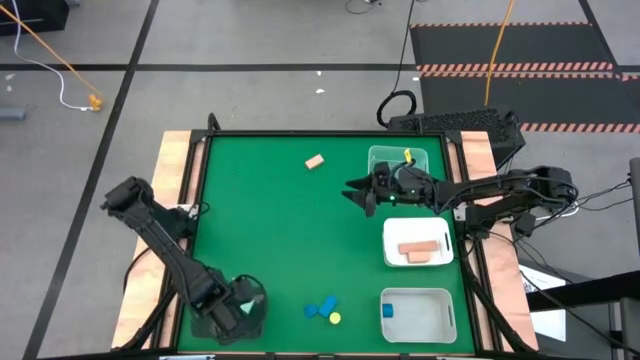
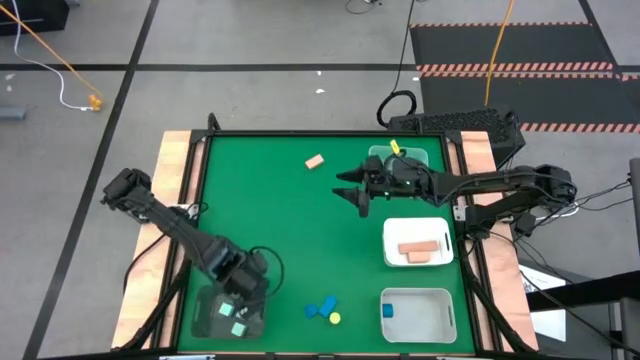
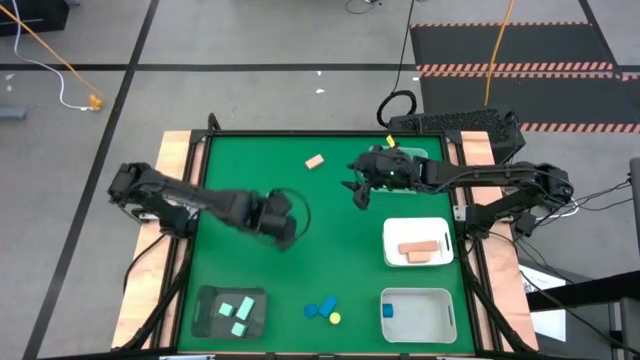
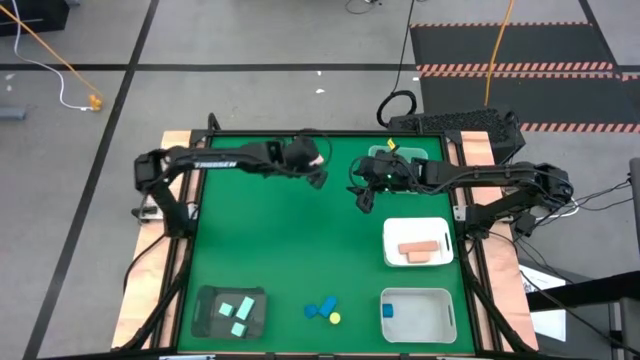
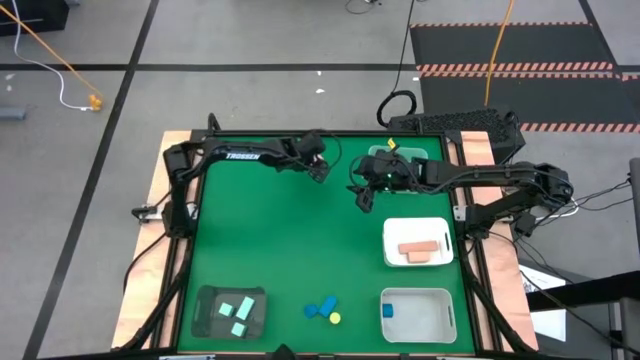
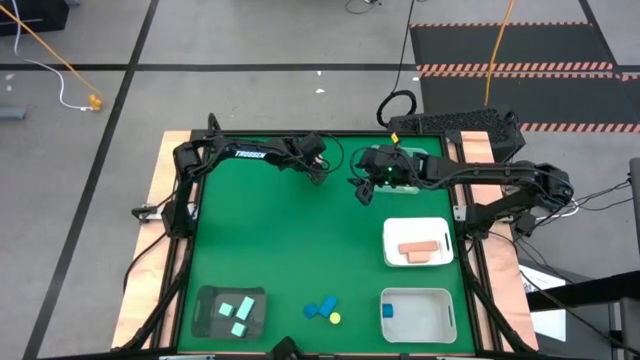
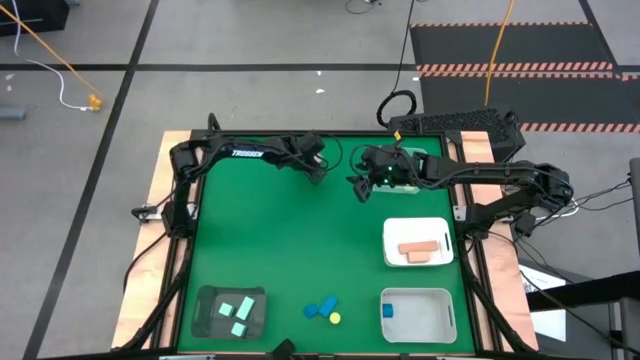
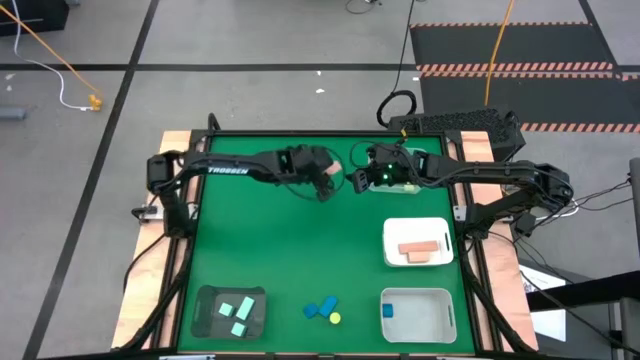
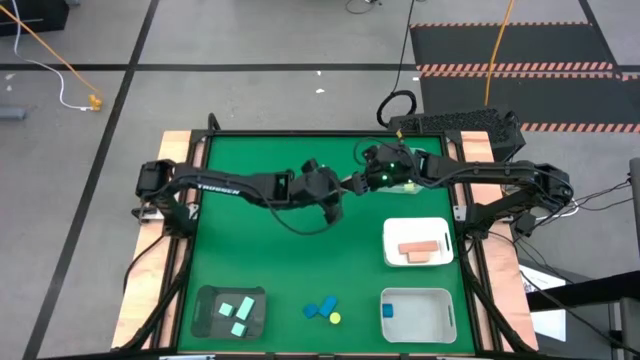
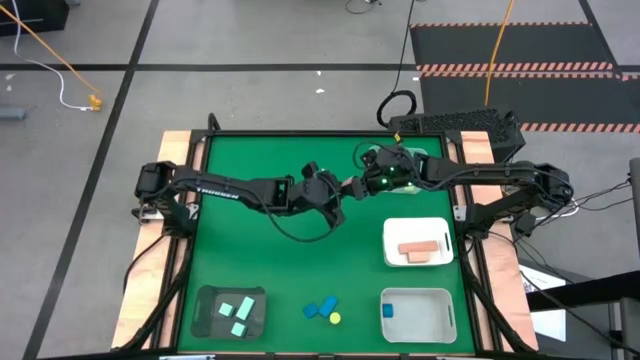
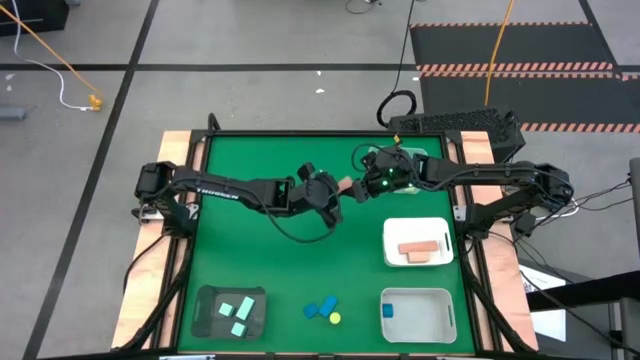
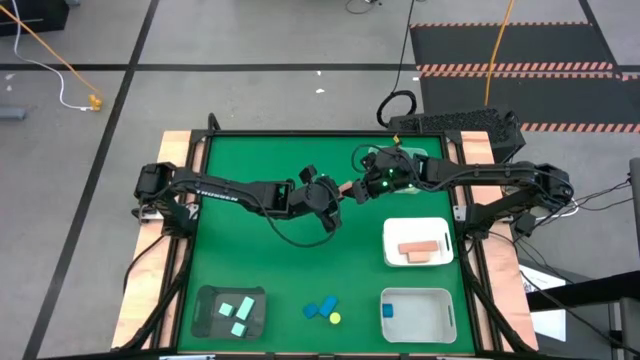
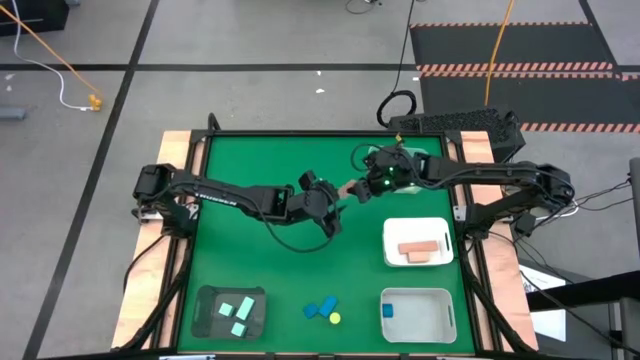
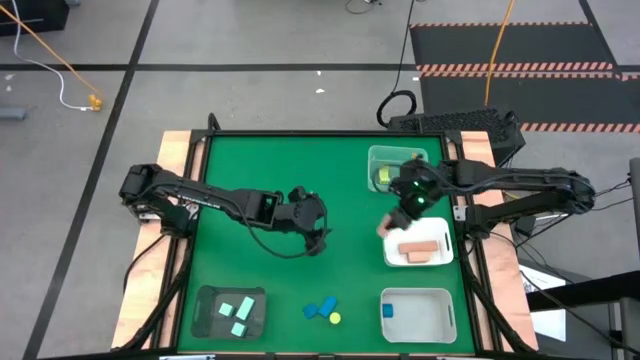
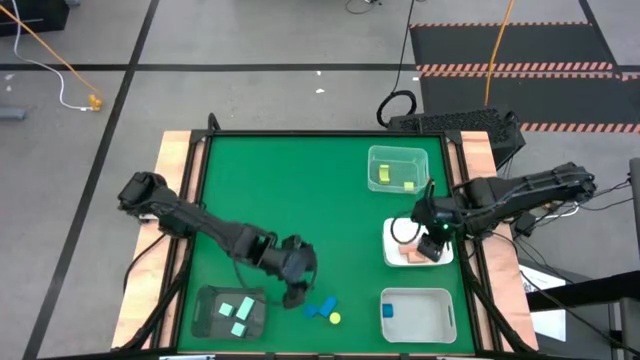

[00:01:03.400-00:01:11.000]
Task: Sort & place blocks by color
Put the brown block into the white bin

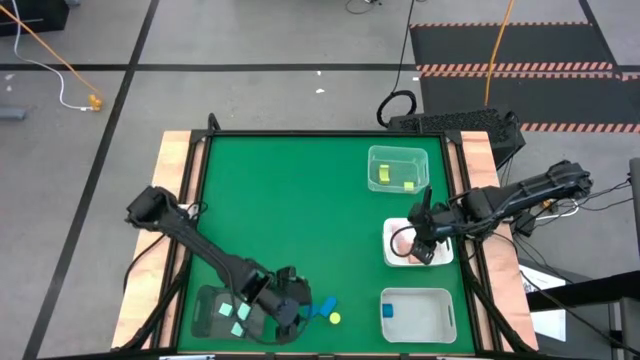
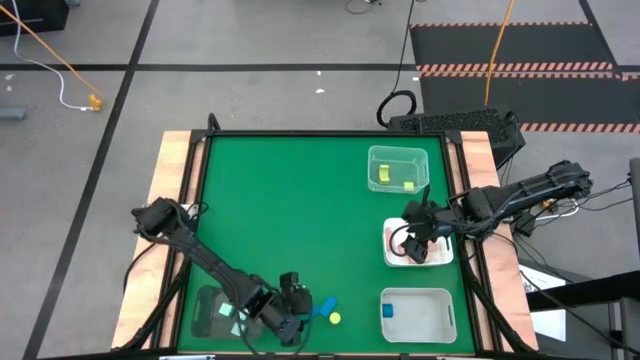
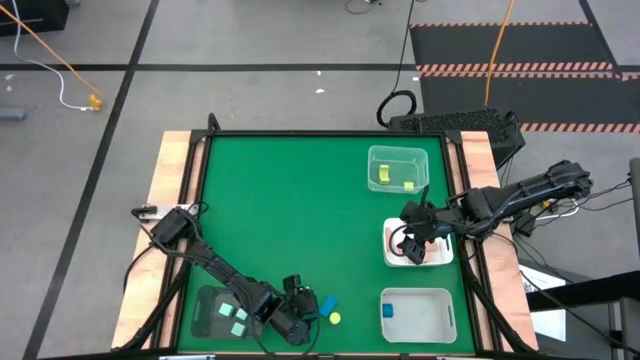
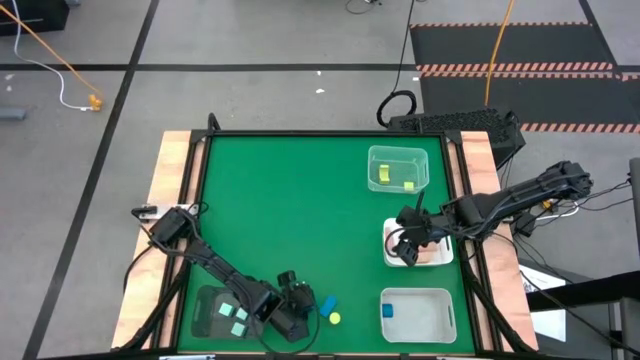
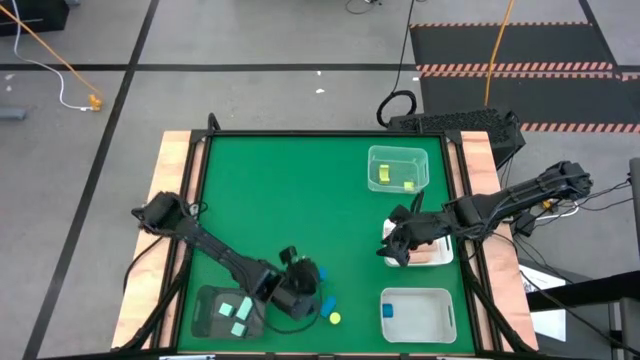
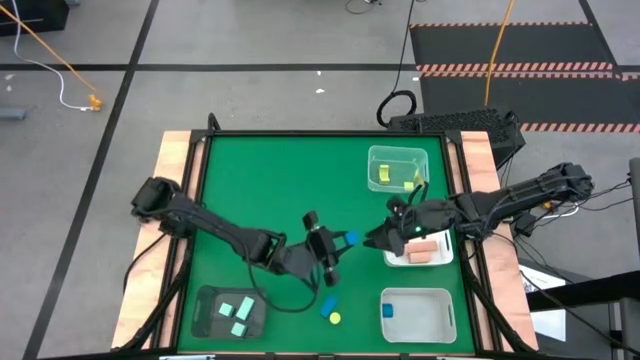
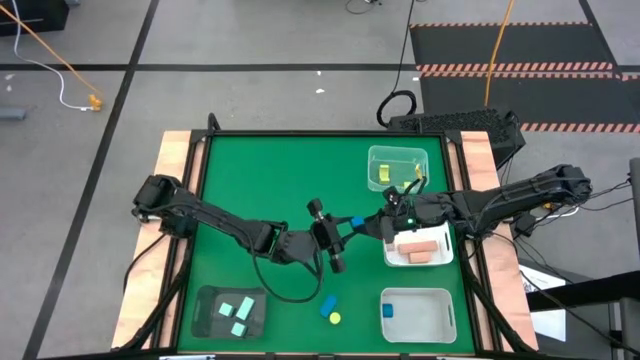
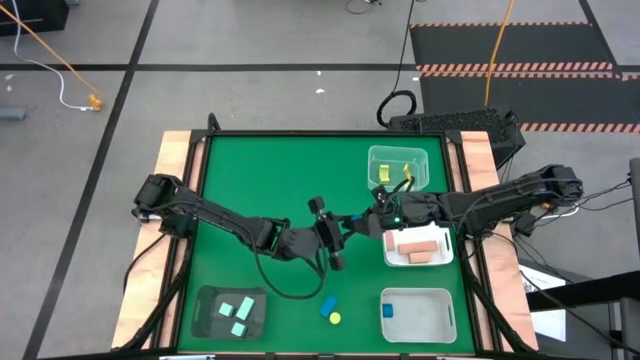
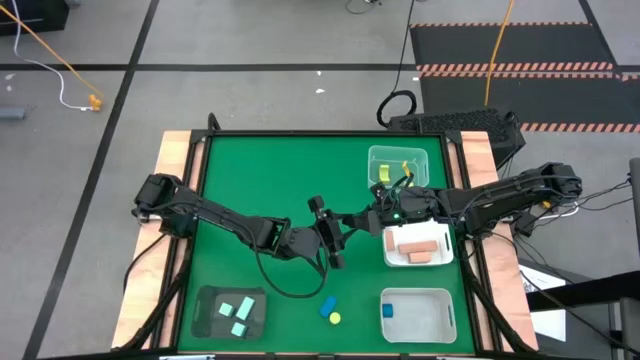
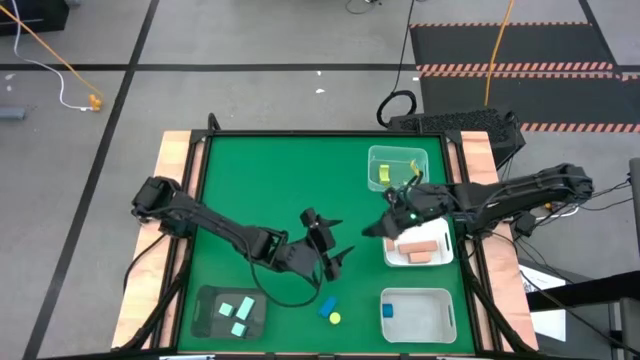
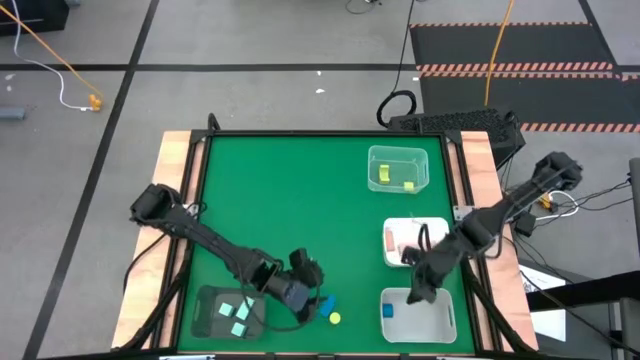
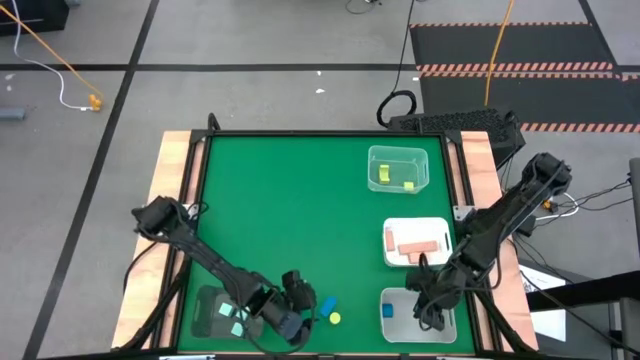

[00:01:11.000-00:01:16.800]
Put the left blue block into the gray bin

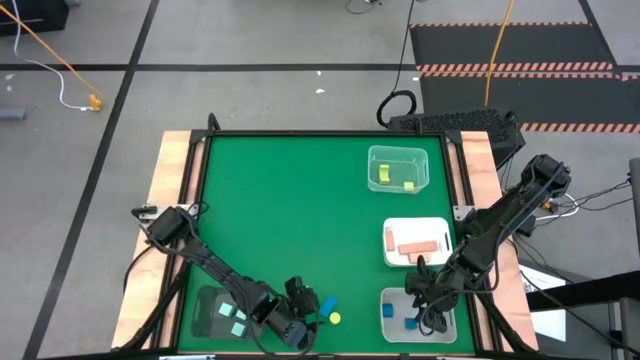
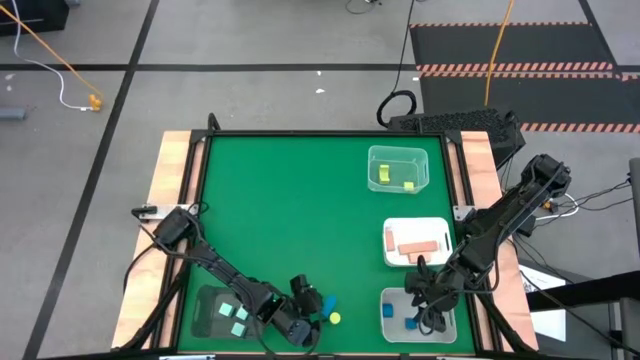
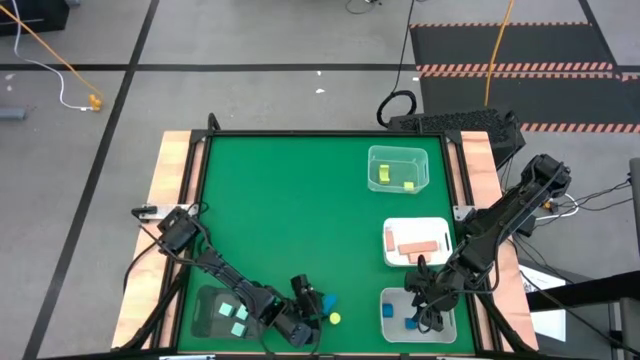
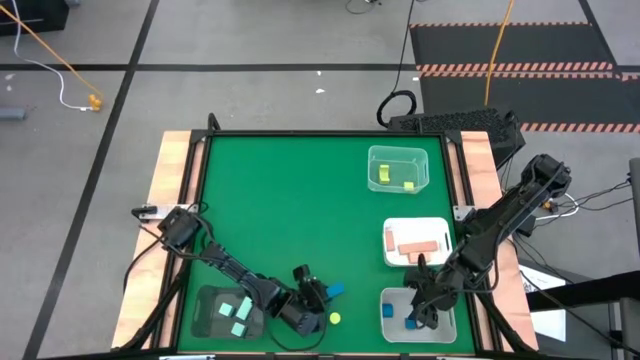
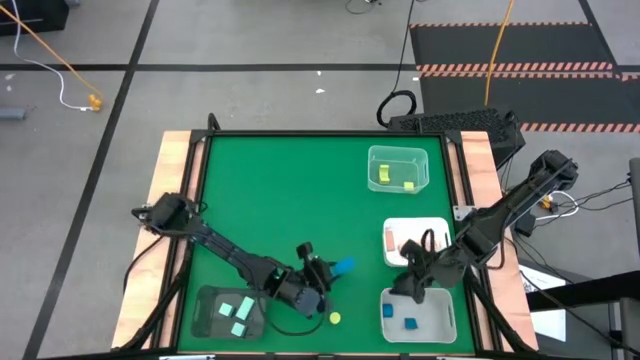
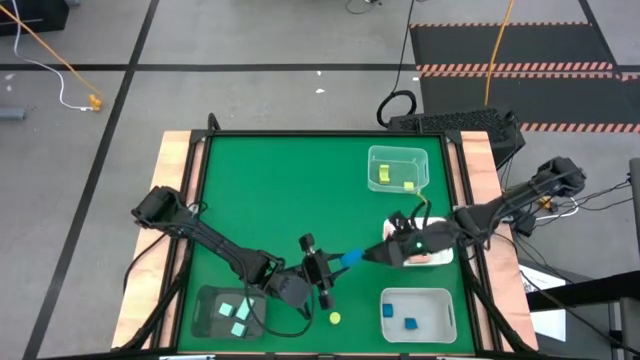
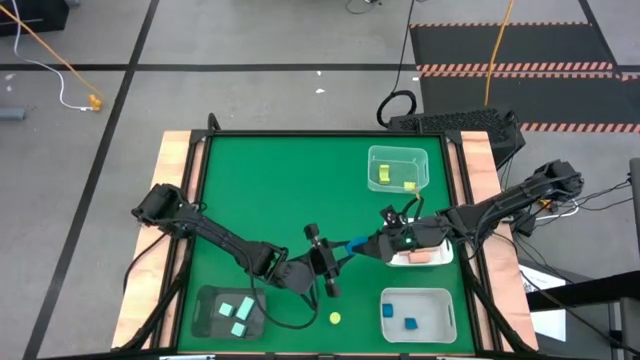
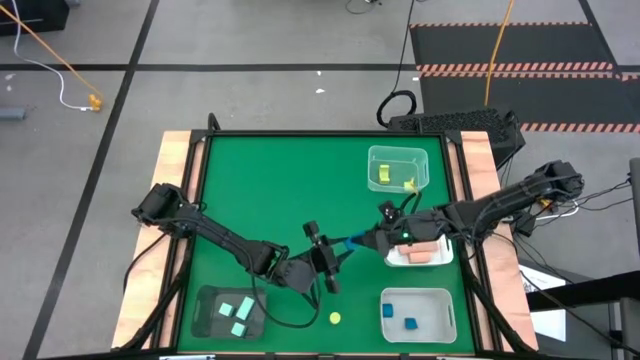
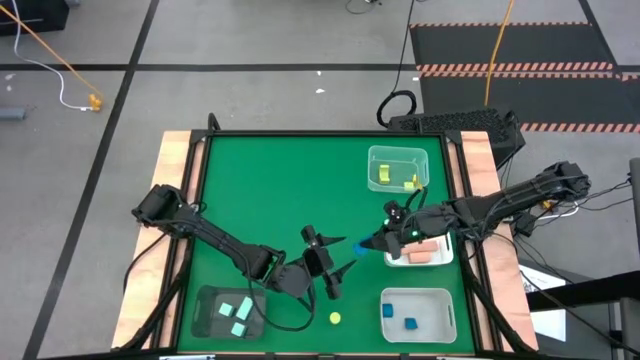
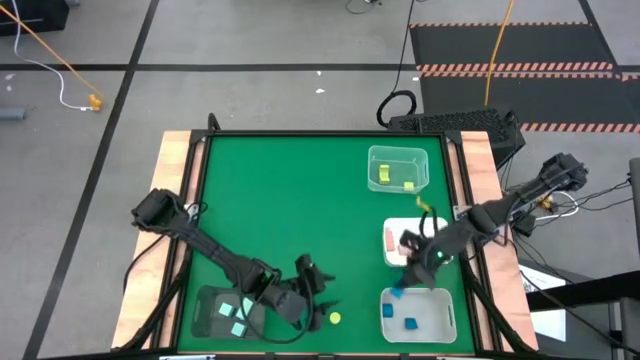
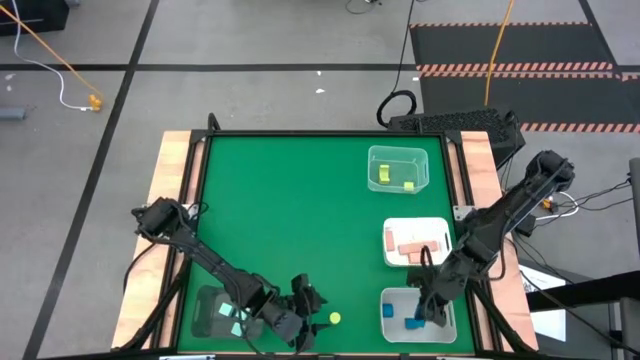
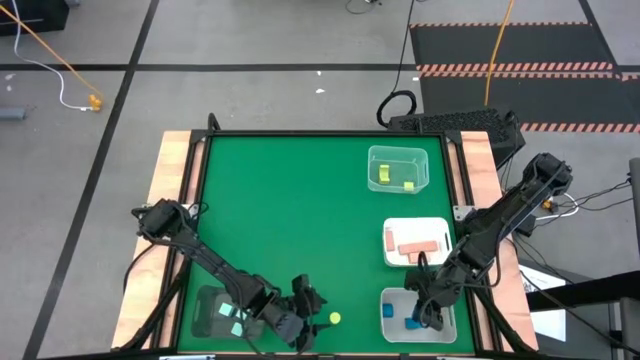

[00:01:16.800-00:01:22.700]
Put the blue block into the gray bin

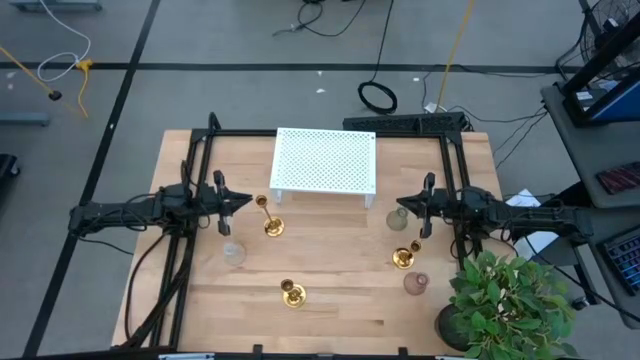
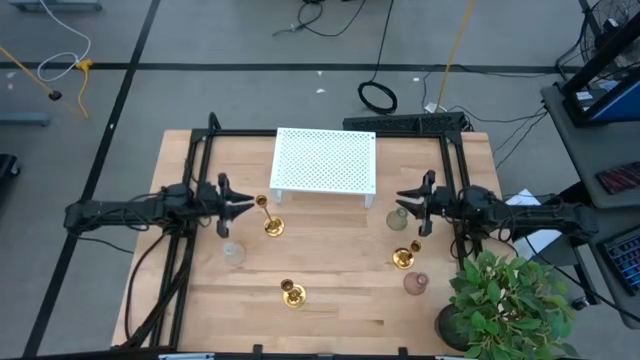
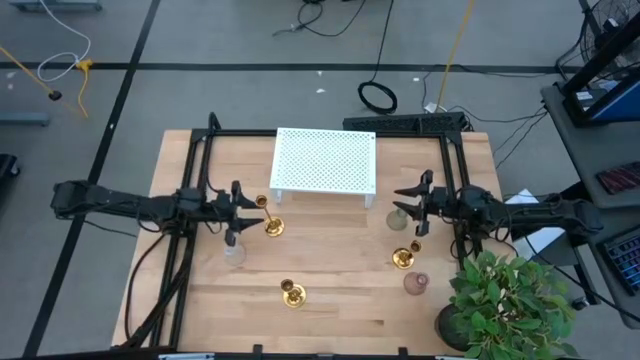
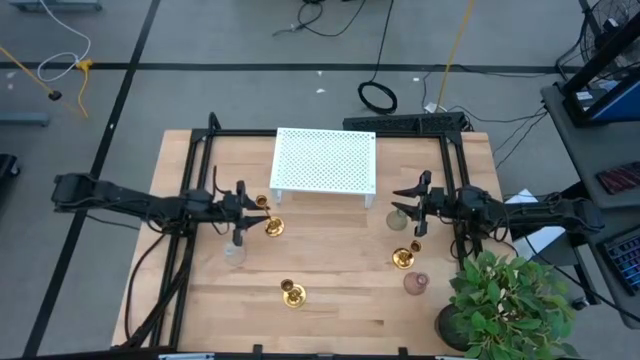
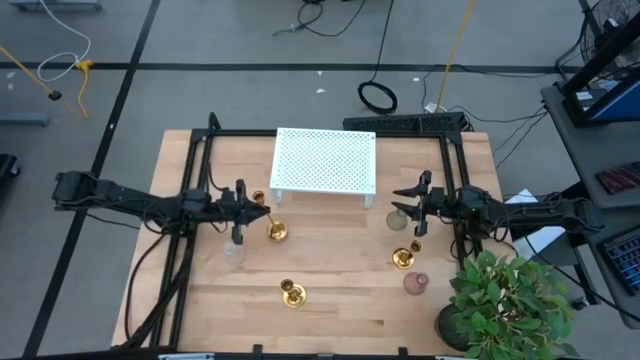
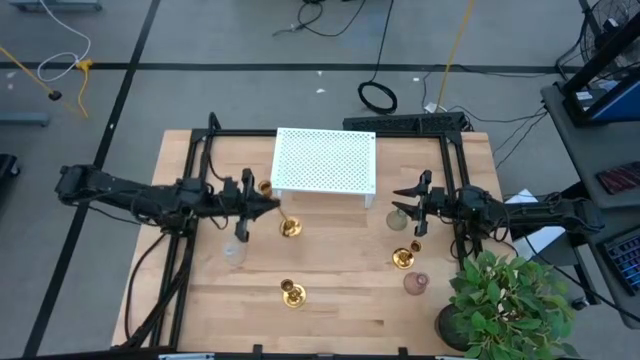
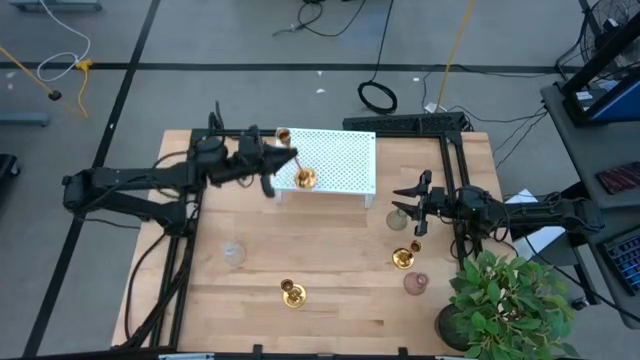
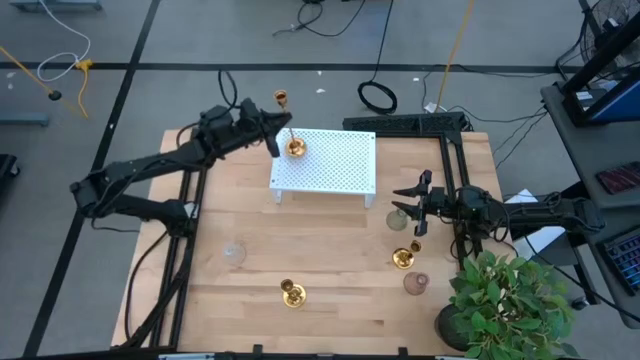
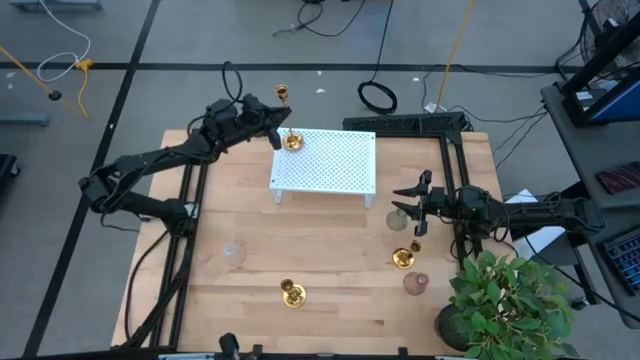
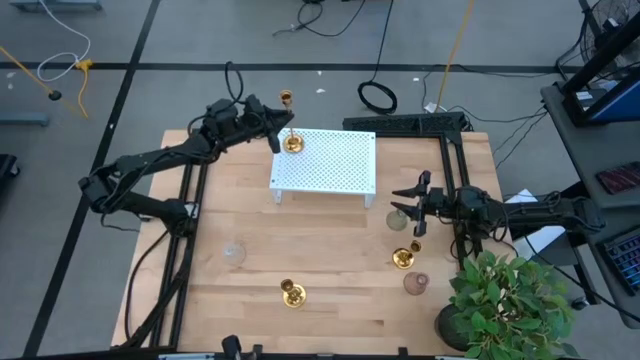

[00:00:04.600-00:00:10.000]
Task: Pick & Place candle stick holders
Put the top long gold candle holder on the shelf
